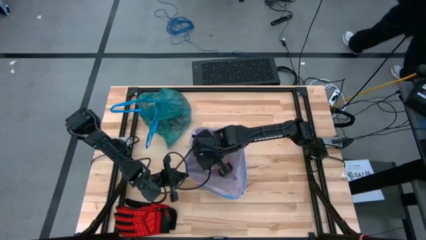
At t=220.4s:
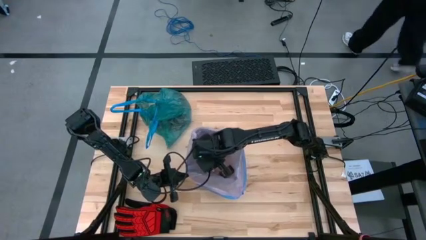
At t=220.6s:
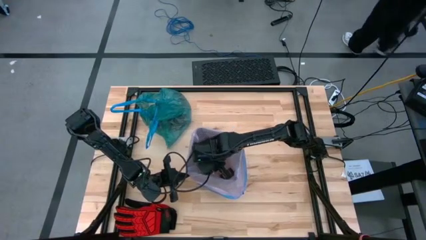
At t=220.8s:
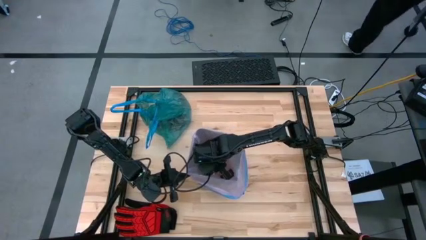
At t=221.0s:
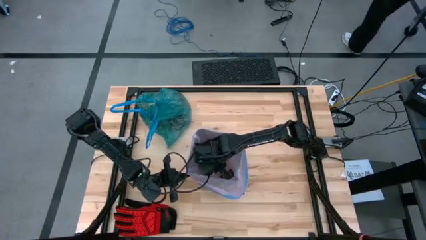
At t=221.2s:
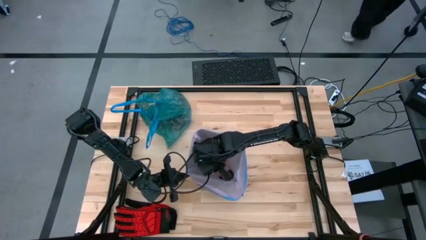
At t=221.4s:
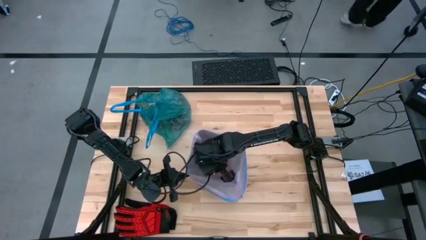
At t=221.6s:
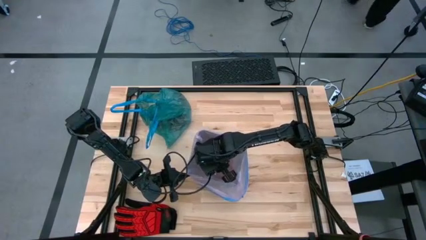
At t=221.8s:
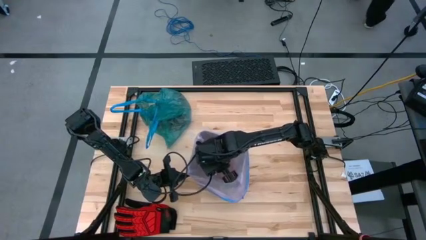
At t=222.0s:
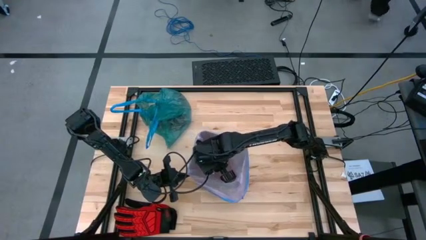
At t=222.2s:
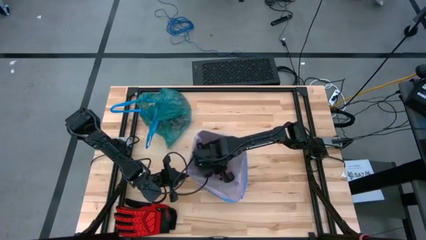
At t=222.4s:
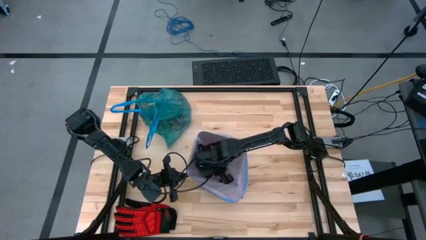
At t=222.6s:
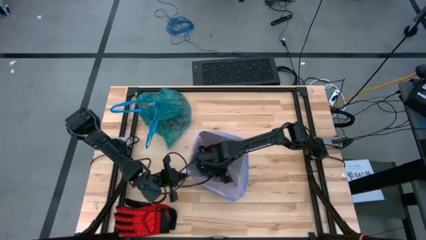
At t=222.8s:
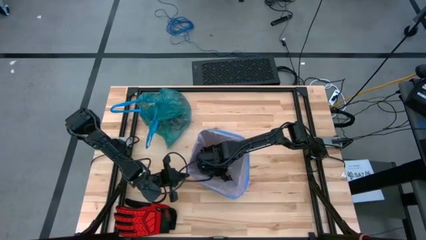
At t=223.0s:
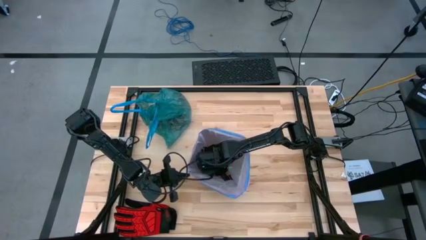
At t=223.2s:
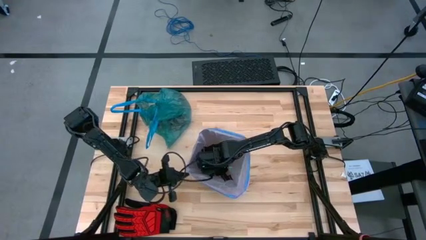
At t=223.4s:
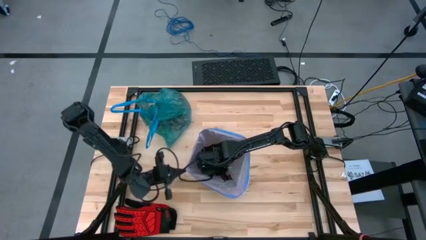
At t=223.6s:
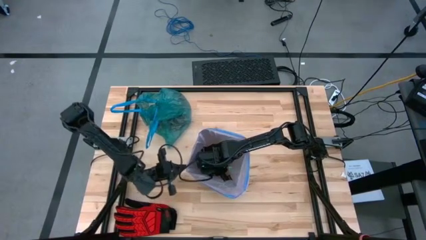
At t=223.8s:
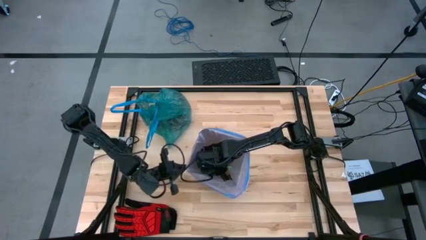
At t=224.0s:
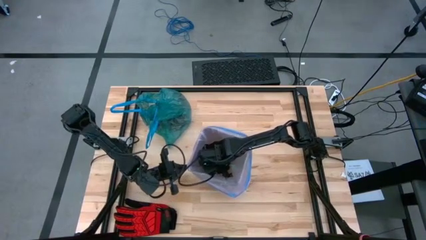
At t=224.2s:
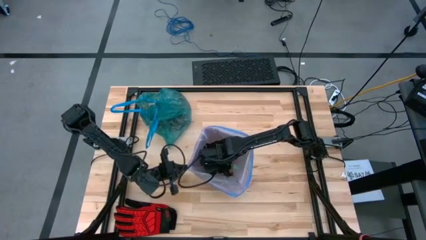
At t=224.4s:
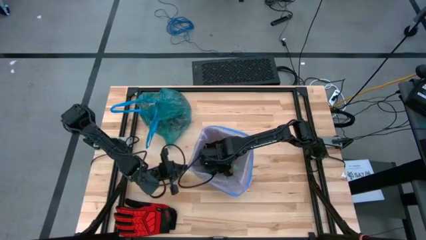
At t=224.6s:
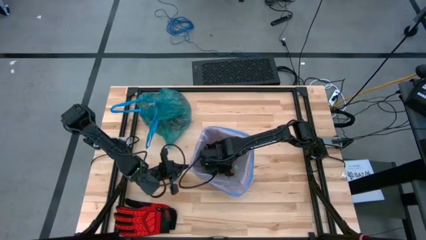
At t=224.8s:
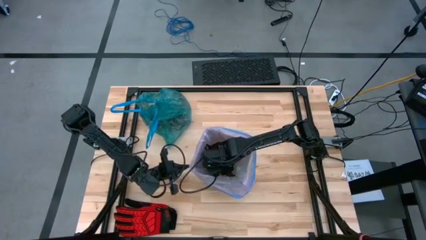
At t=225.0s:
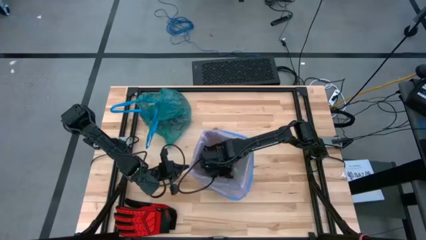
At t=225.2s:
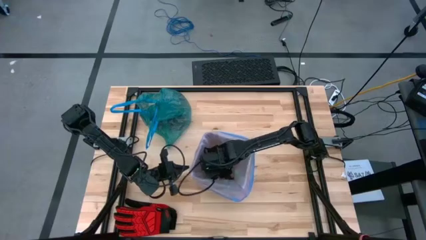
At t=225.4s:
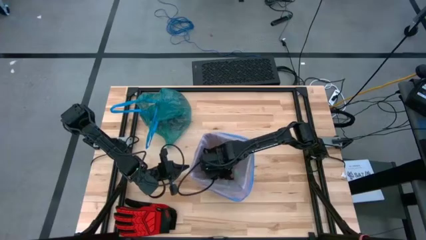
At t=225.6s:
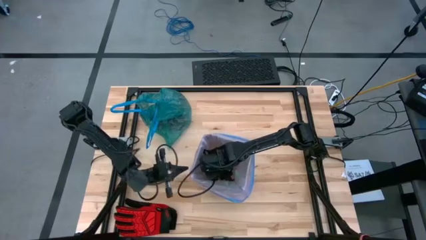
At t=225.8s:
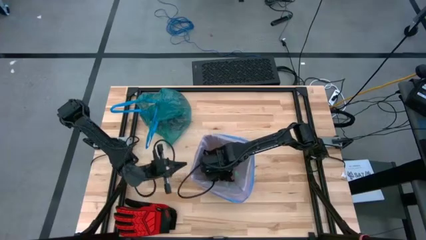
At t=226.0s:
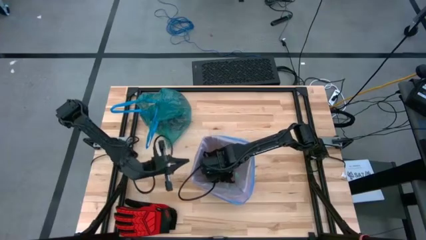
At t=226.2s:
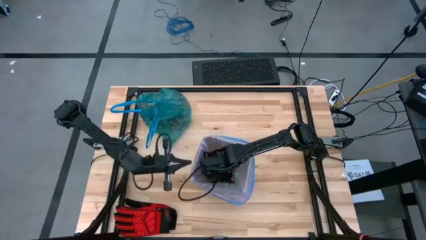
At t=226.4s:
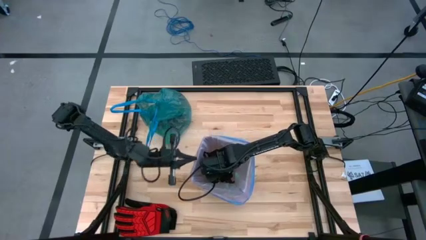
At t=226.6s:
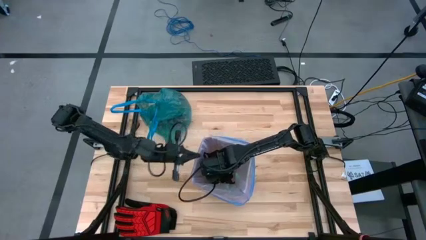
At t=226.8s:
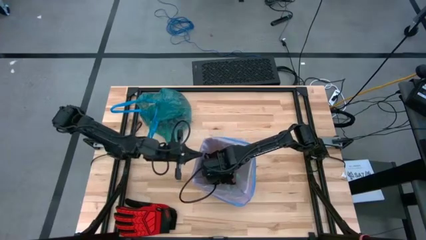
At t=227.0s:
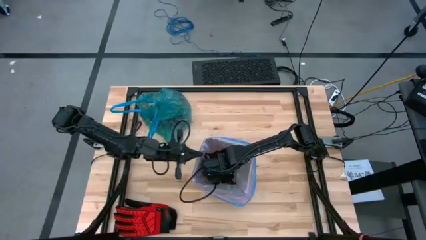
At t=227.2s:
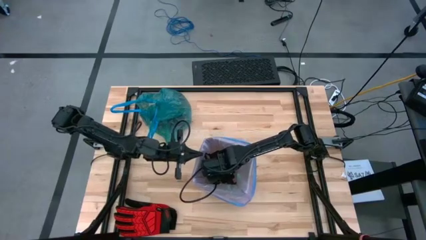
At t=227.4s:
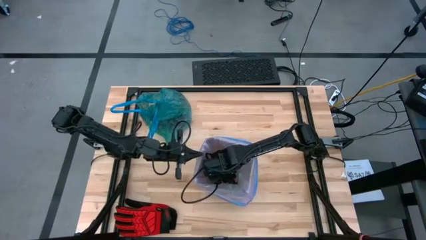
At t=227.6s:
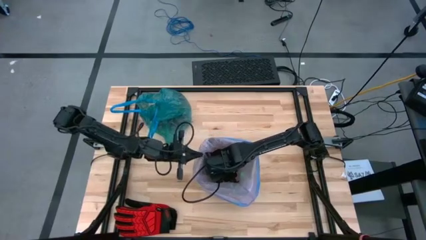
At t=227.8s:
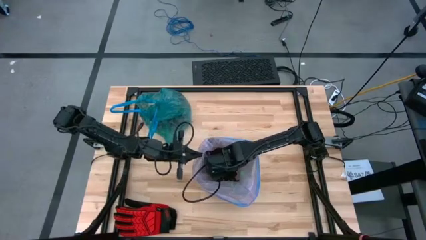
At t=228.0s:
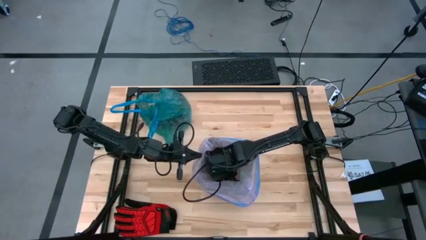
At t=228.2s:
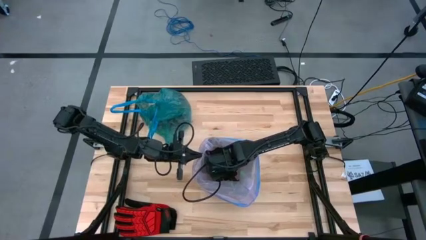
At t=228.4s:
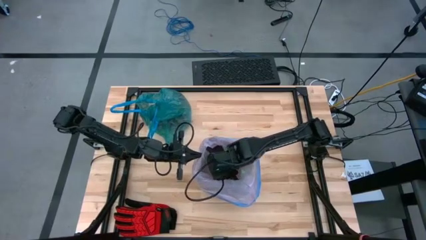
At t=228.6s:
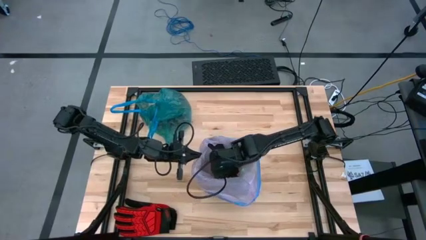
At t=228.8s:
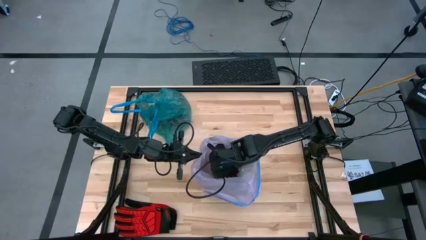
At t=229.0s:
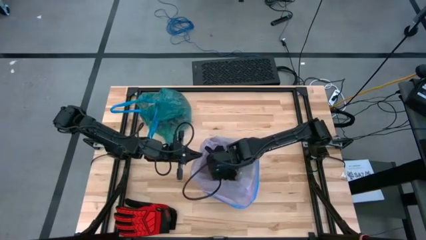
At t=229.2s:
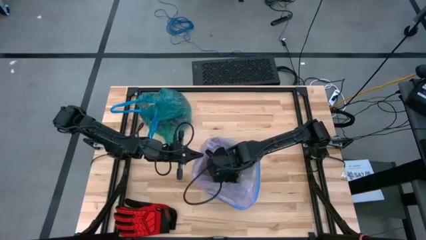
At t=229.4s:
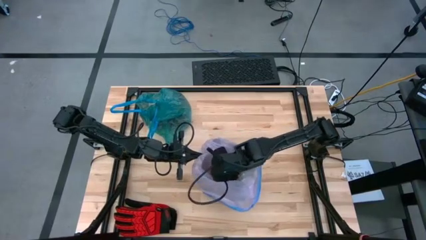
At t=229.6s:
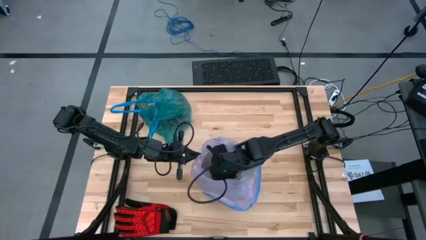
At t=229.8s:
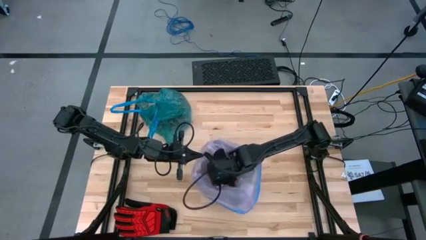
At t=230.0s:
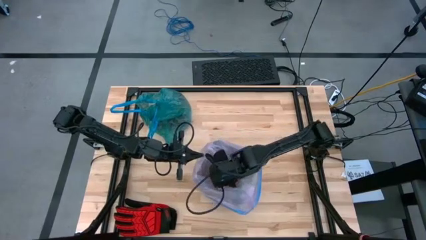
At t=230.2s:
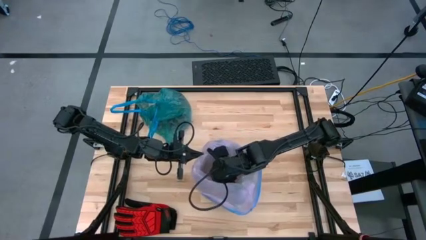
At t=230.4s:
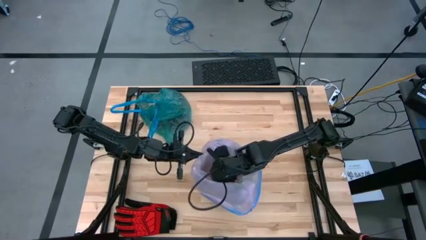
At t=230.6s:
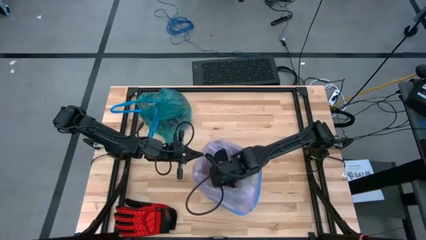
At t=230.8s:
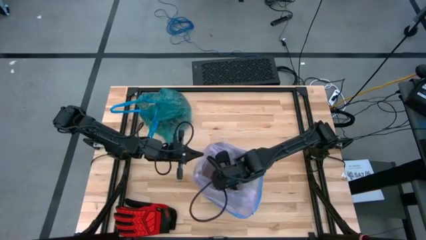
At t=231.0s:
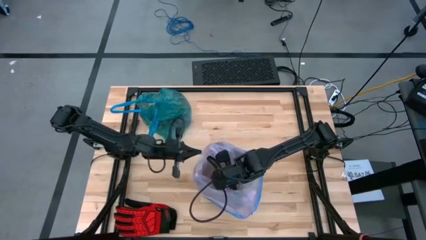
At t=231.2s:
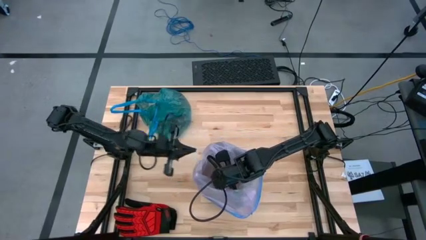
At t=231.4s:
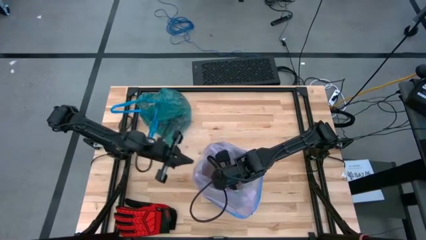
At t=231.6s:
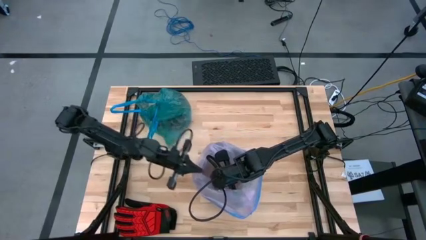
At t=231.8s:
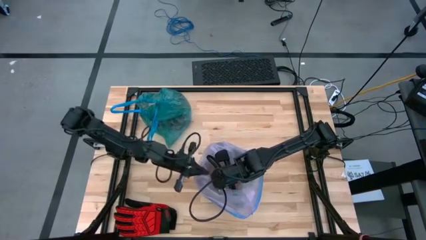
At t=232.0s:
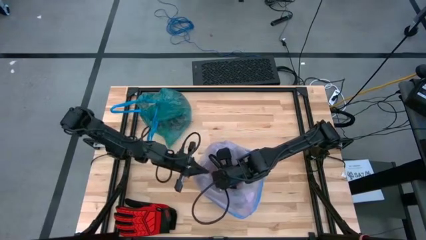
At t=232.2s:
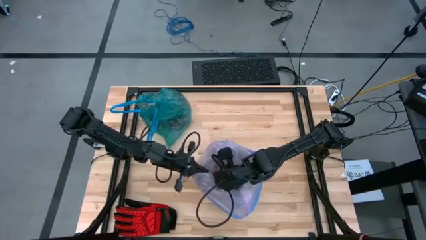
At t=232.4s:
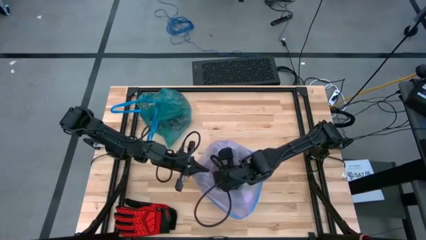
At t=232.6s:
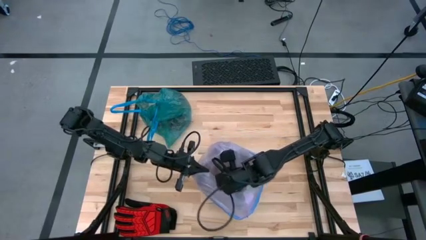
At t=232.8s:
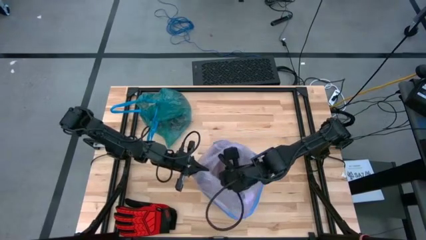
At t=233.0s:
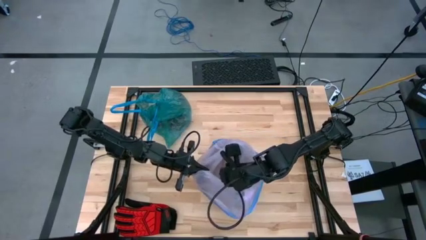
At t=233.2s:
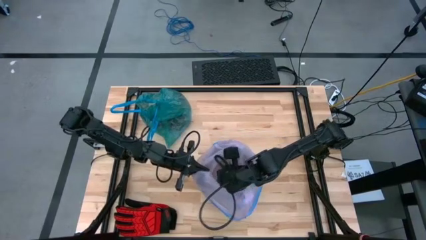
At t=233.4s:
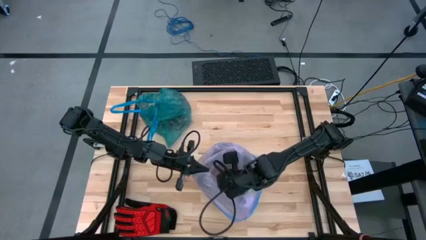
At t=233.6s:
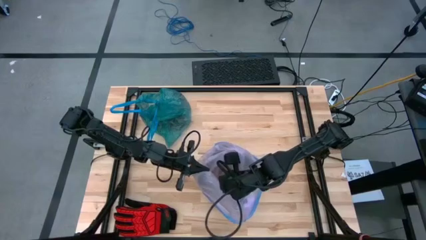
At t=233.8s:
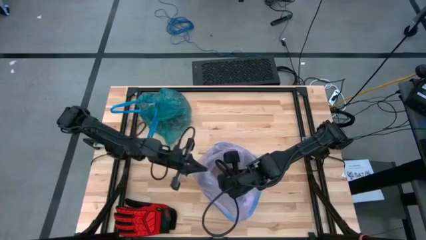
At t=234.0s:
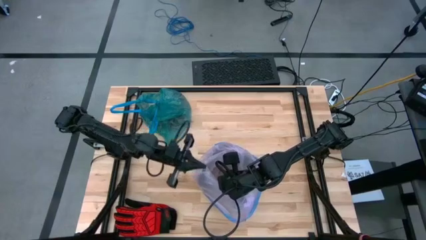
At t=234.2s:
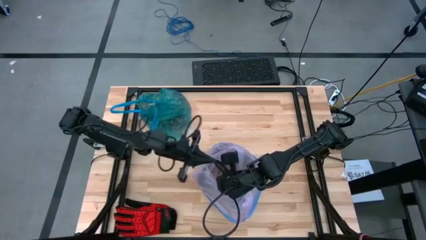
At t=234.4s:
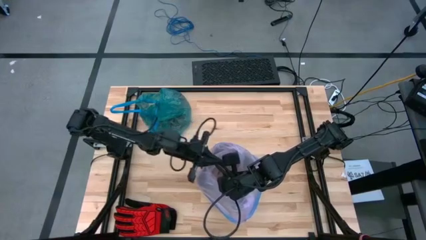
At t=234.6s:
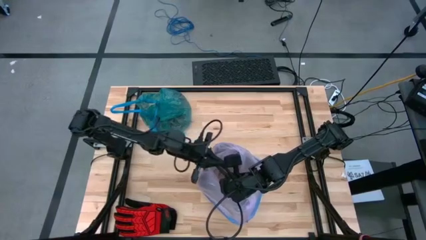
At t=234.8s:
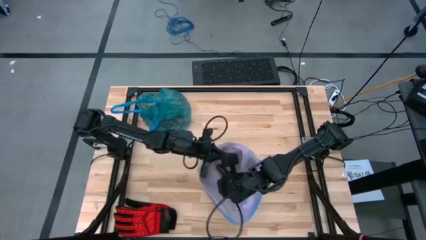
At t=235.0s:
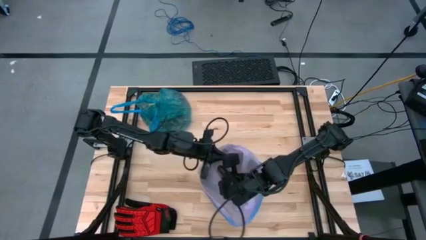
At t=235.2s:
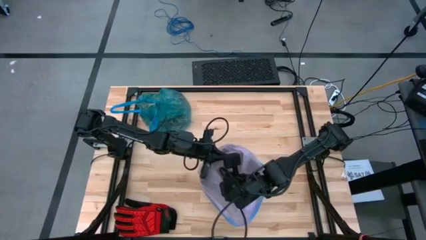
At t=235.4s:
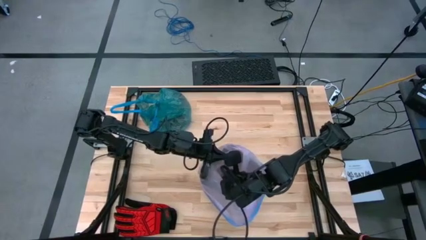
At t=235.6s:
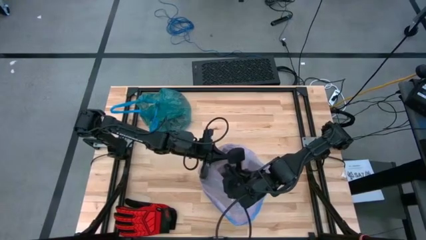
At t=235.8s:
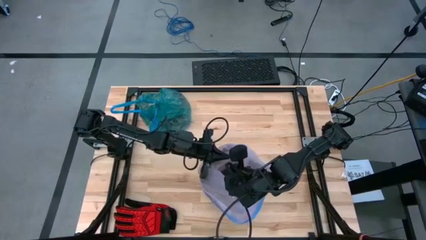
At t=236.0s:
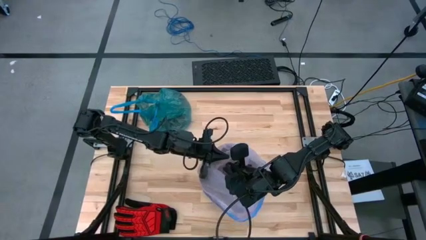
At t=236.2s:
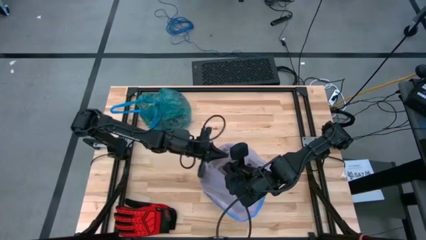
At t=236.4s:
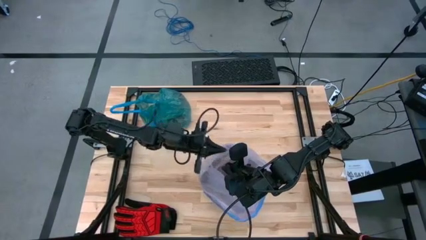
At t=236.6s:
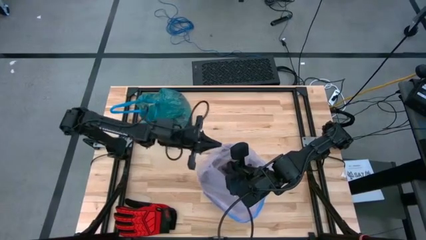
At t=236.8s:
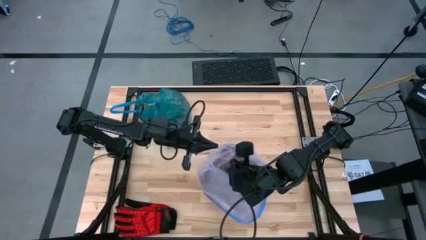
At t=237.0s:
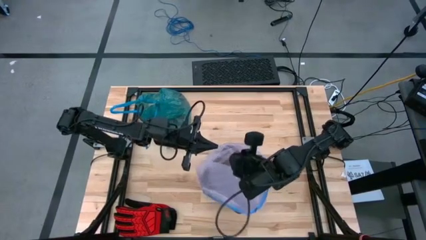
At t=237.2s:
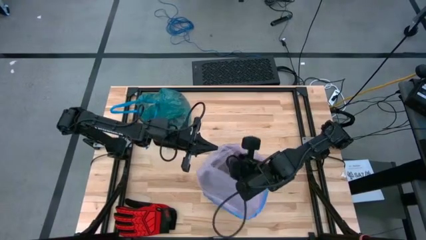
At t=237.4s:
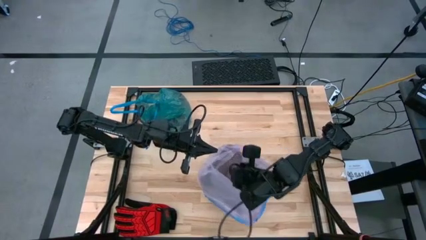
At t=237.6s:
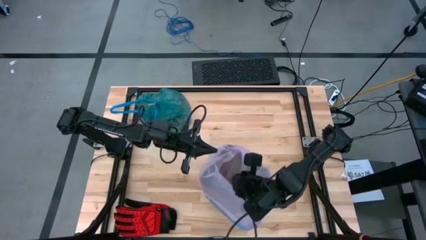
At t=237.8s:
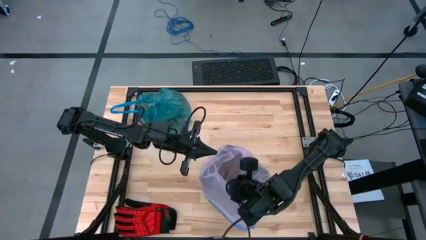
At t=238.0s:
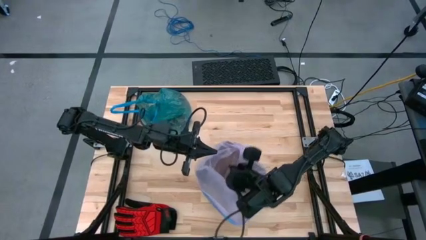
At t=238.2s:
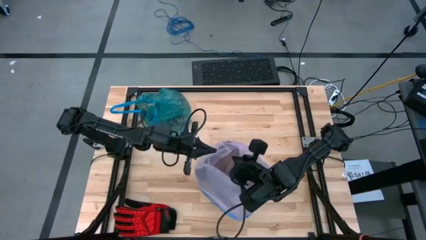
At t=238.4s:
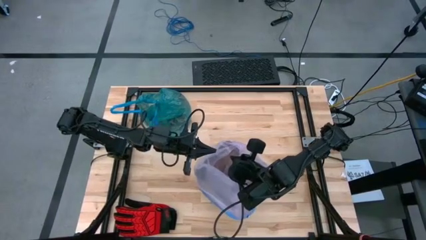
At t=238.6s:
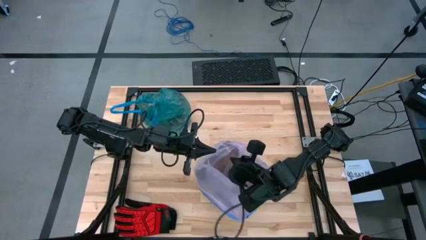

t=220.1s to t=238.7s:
Task: place trash/remove bag and relplace
Insert the trash bag into the trash bin
